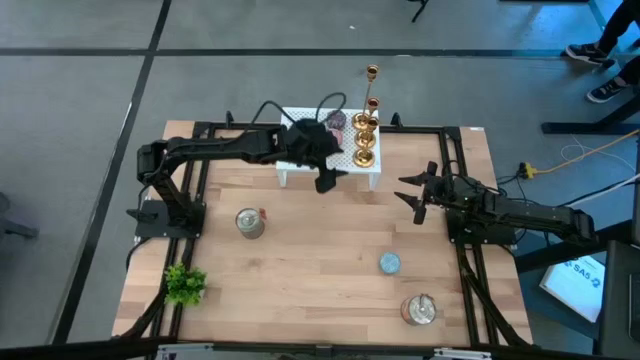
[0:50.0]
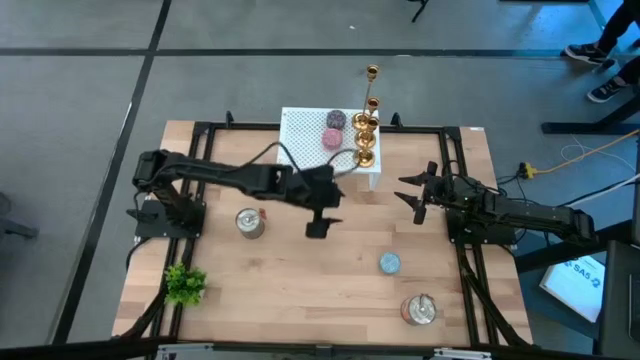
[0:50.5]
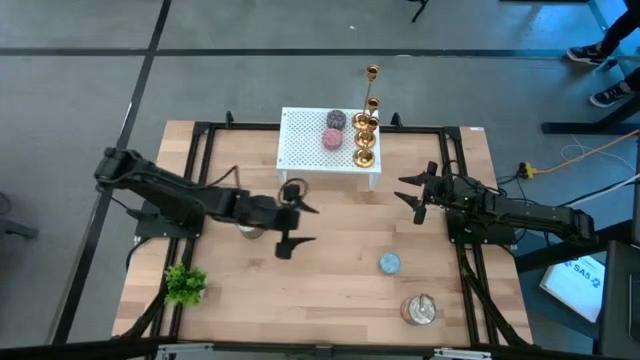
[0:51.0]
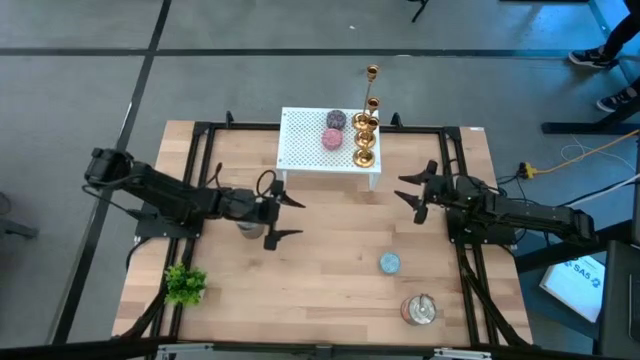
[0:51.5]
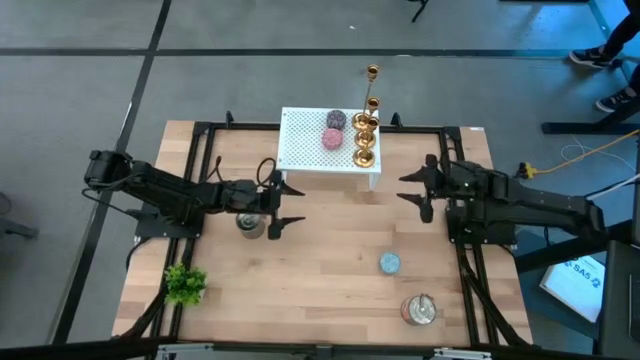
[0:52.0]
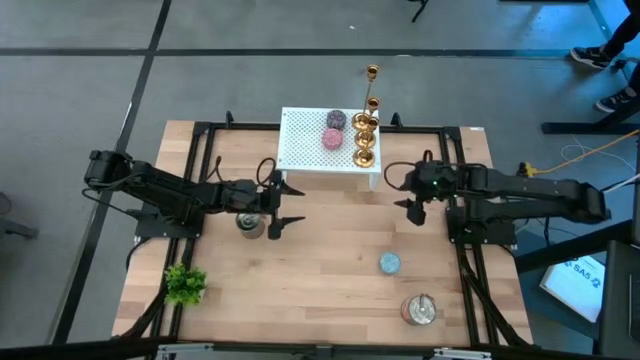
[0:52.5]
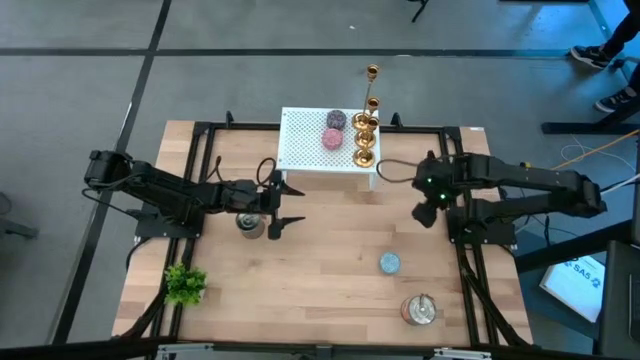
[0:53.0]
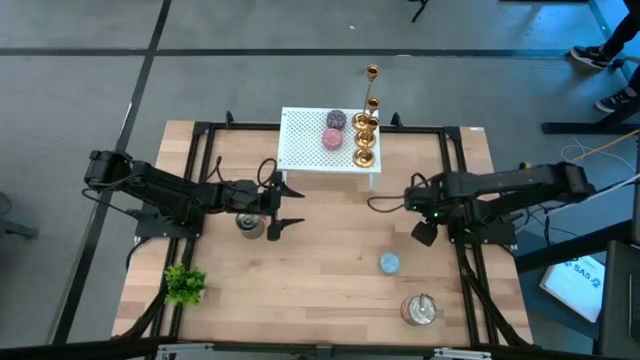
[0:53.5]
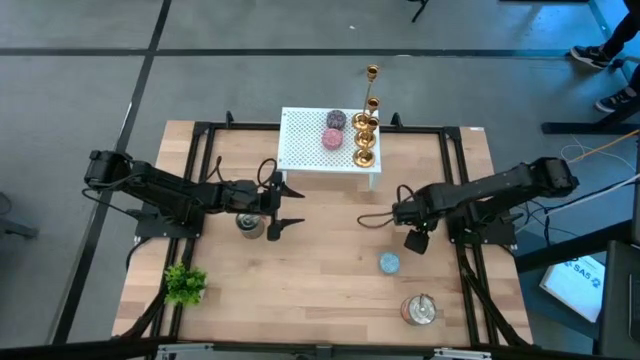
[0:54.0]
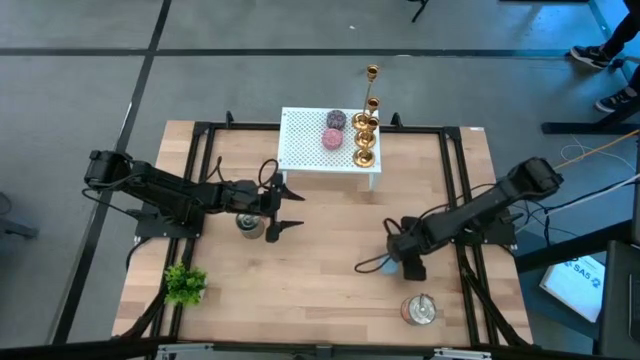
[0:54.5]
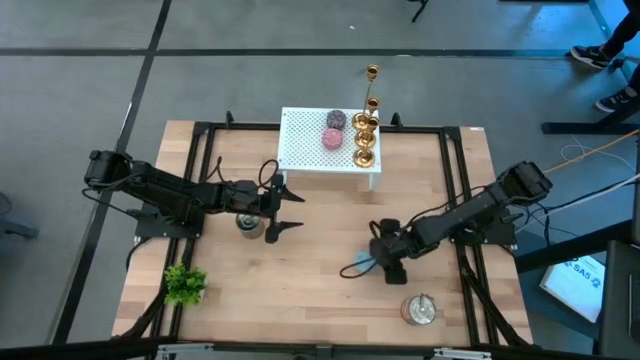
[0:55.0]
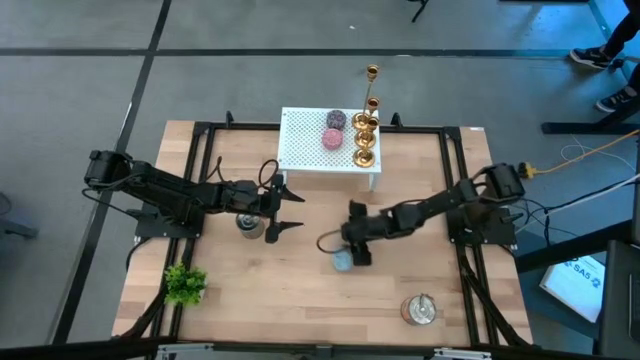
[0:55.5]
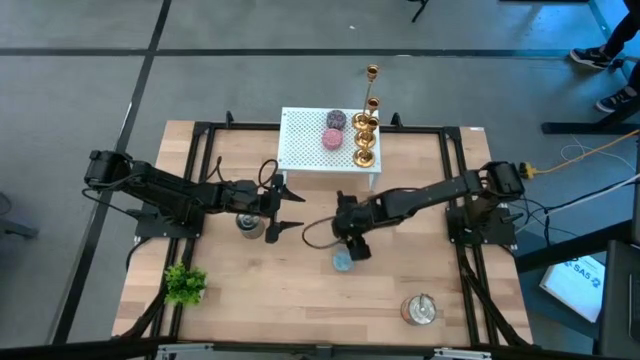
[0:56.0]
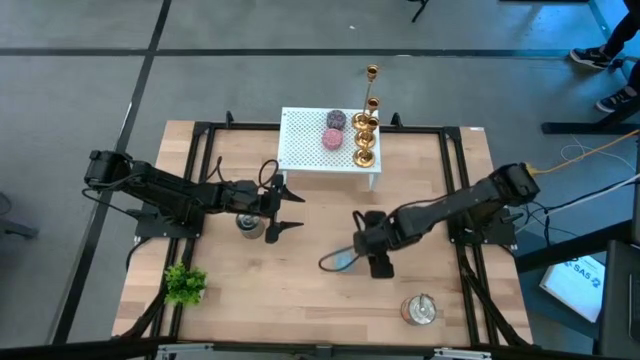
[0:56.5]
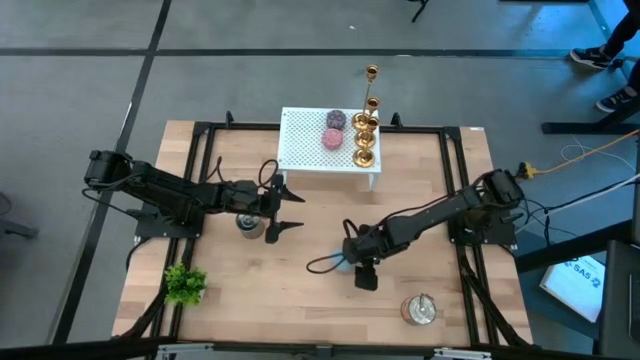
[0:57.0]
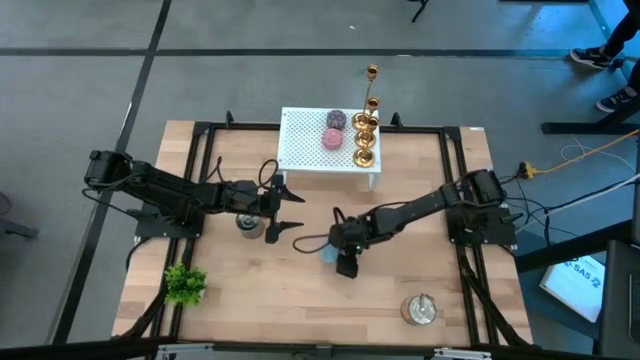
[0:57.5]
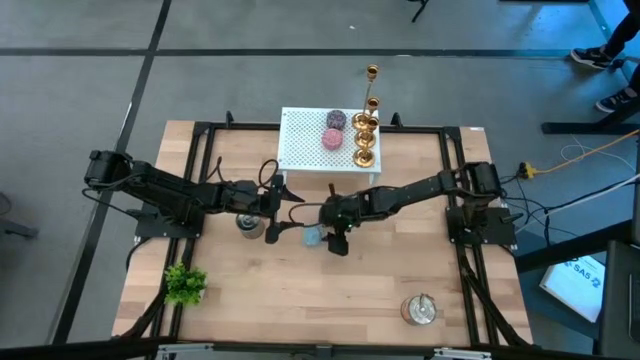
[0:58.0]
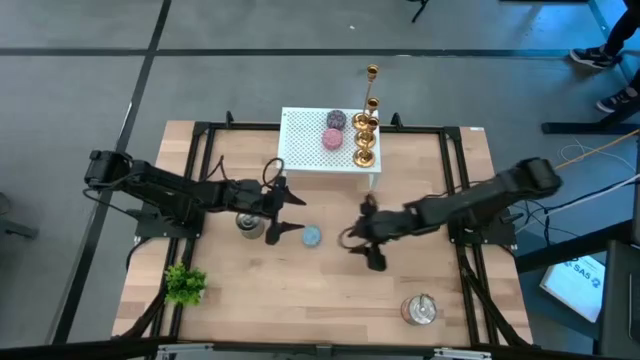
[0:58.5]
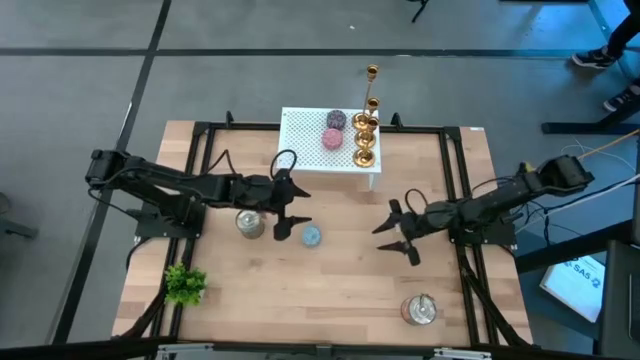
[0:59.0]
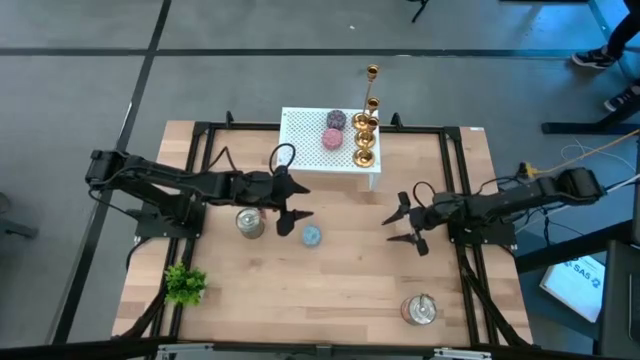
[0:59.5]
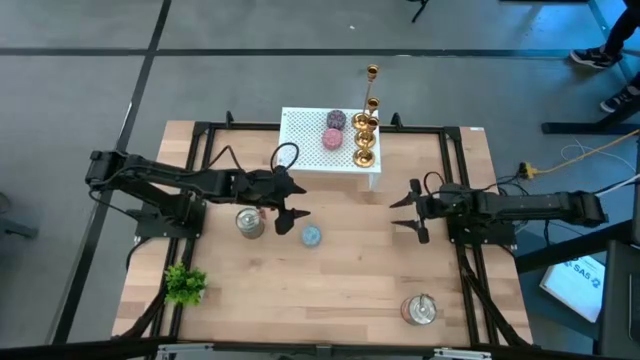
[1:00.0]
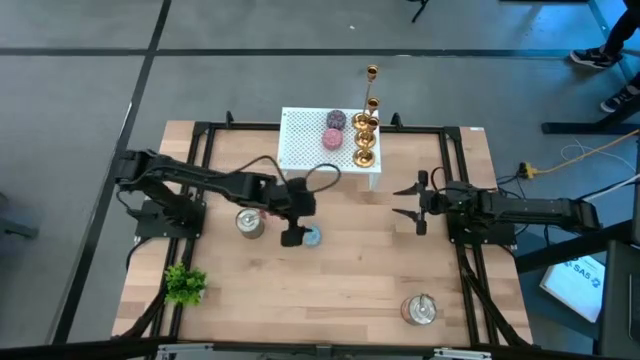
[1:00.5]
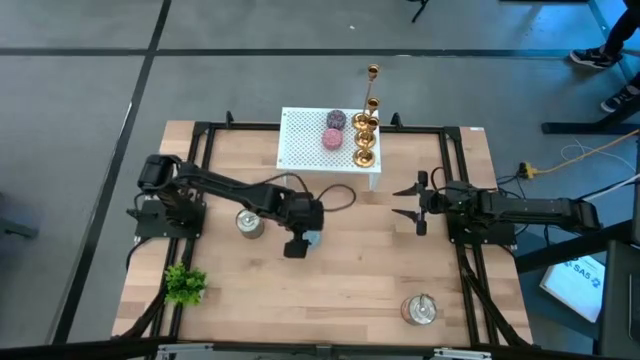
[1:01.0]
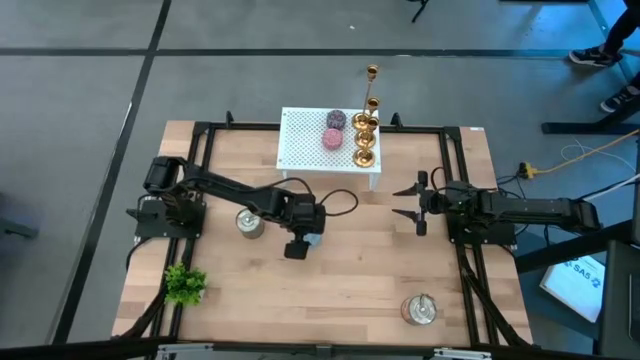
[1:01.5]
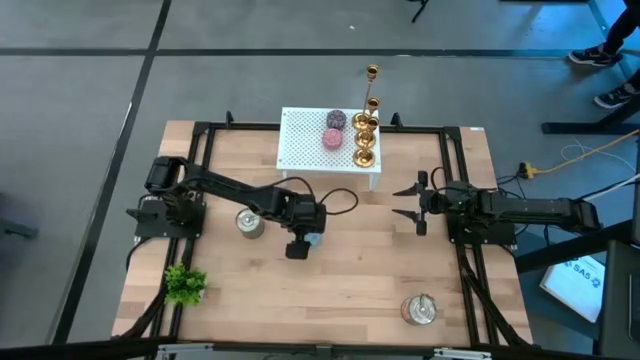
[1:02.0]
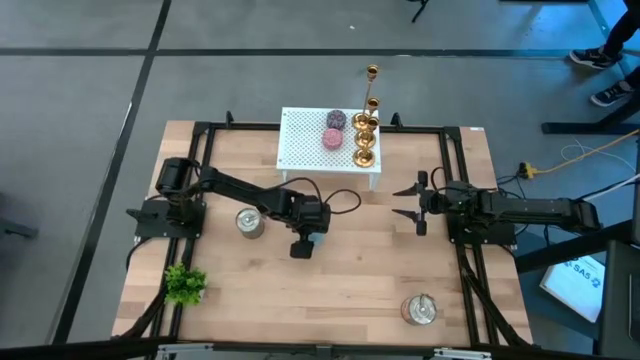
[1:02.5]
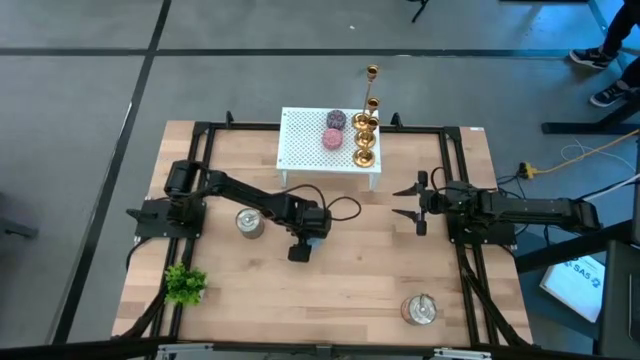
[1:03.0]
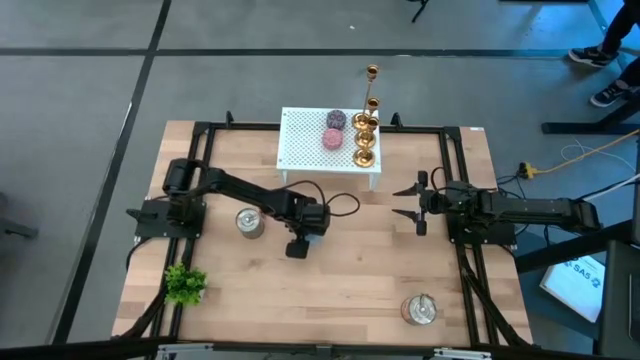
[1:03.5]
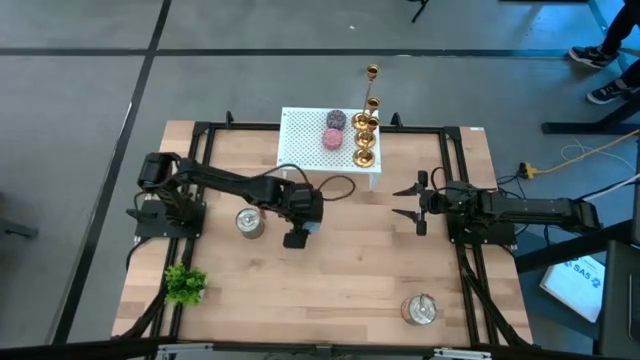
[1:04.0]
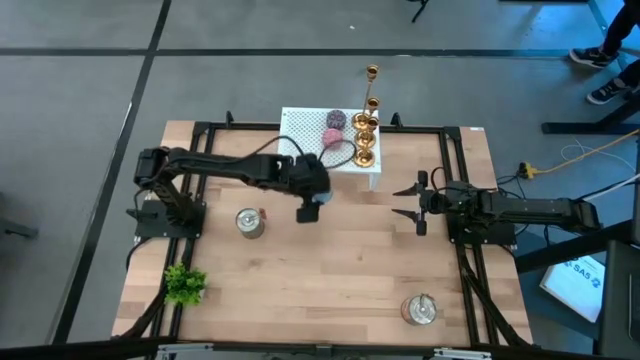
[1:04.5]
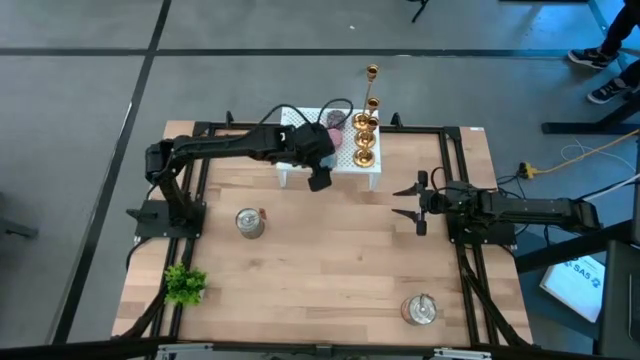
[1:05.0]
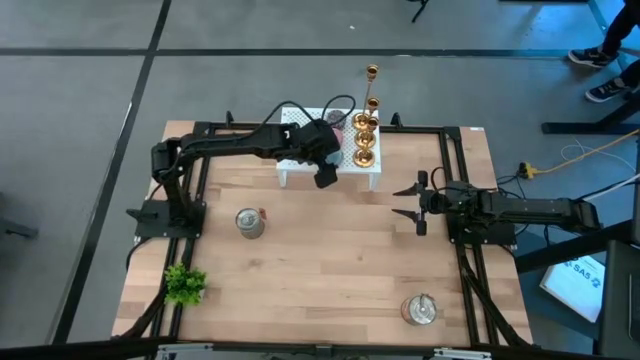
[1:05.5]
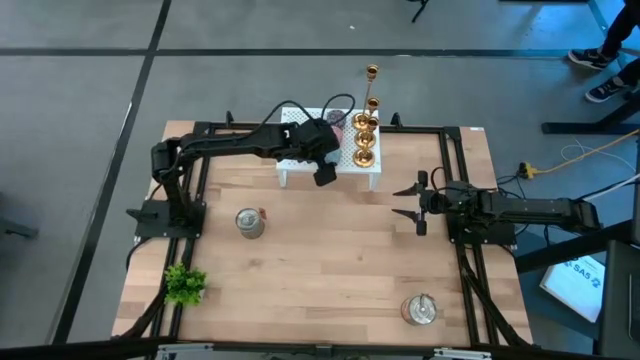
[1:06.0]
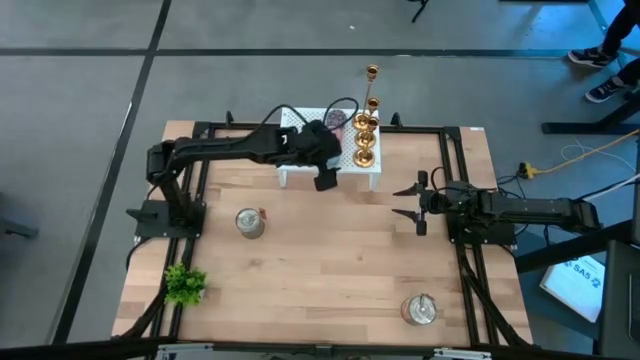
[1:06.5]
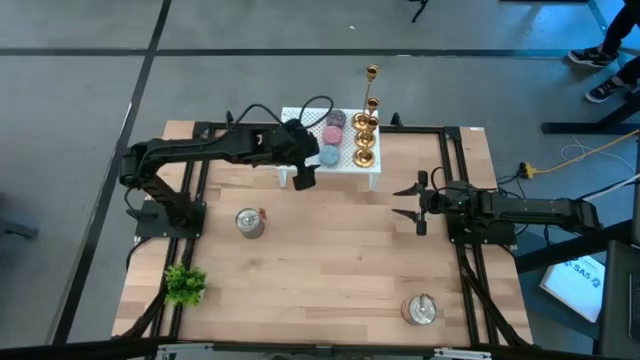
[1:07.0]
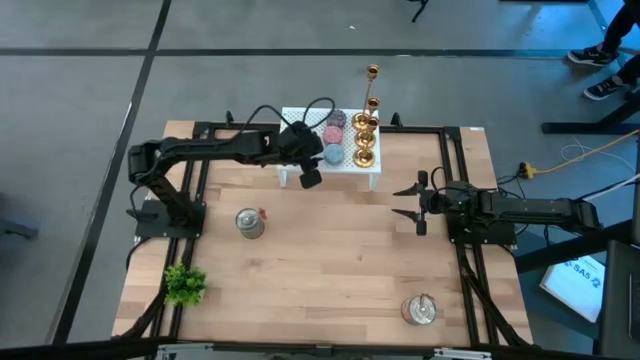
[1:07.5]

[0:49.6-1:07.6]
Task: Pick & Place candle stick holders
Put the small blue scented candle on the shelf

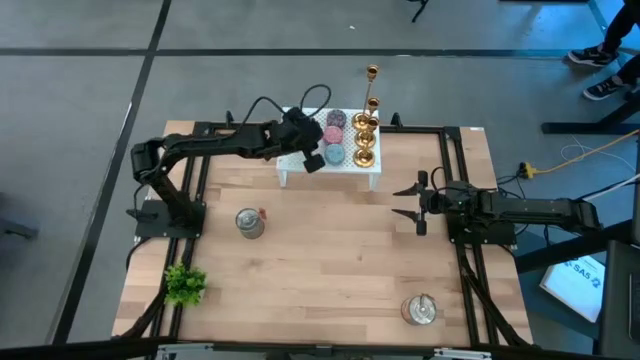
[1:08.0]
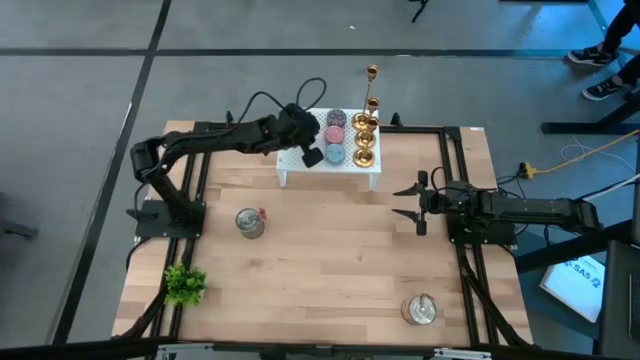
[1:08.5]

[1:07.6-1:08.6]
Adjust the small pink scented candle on the shelf
